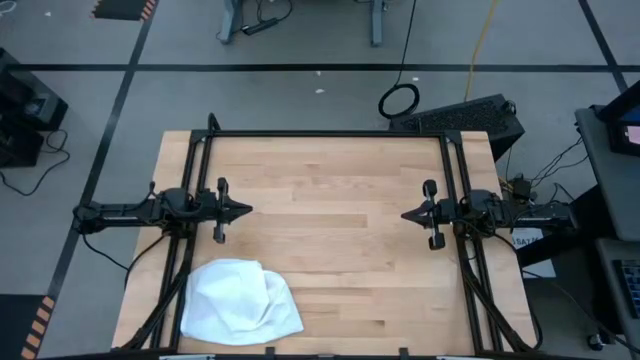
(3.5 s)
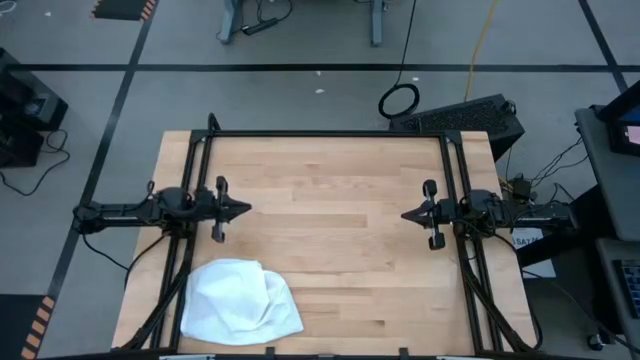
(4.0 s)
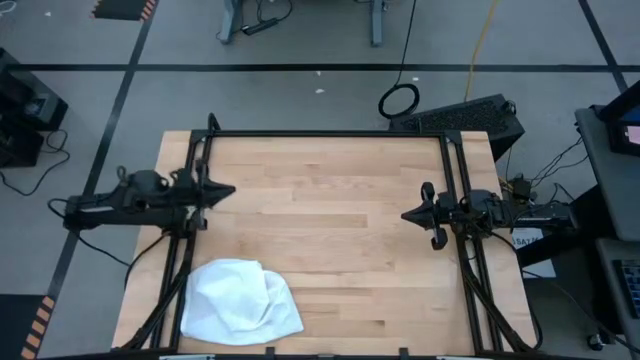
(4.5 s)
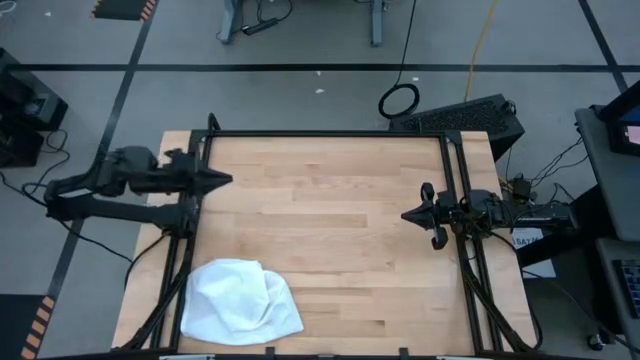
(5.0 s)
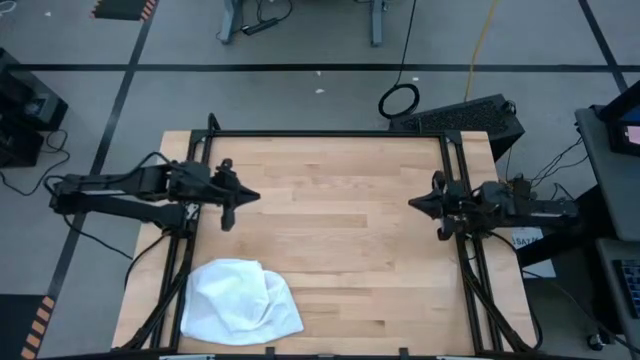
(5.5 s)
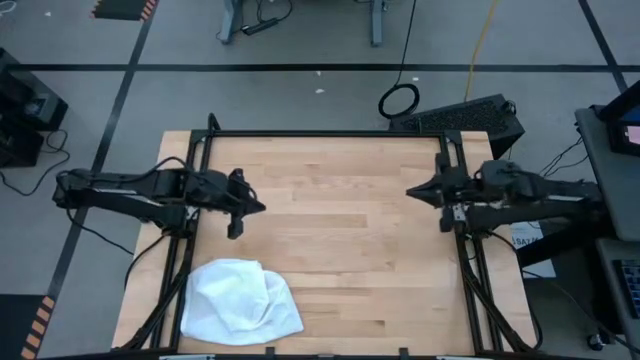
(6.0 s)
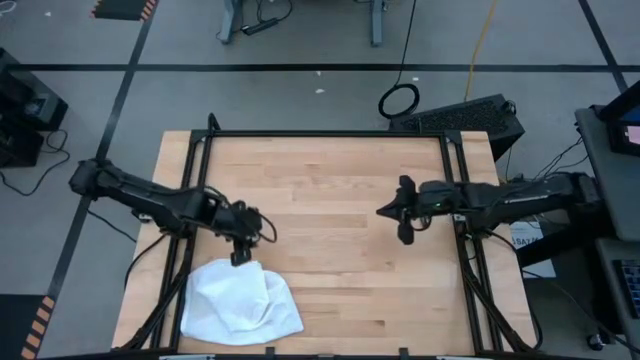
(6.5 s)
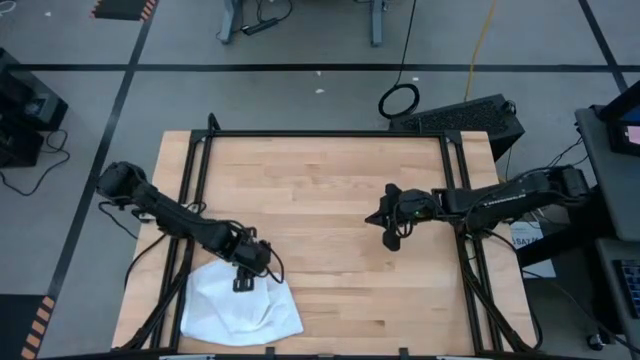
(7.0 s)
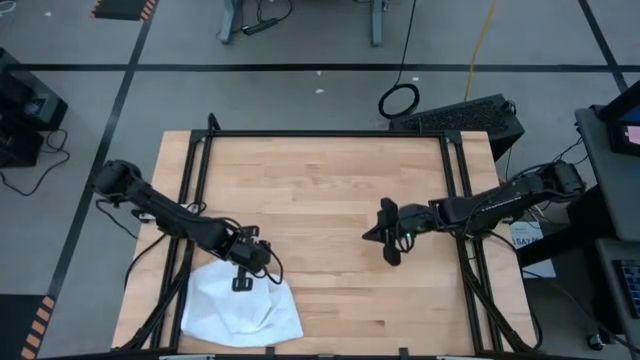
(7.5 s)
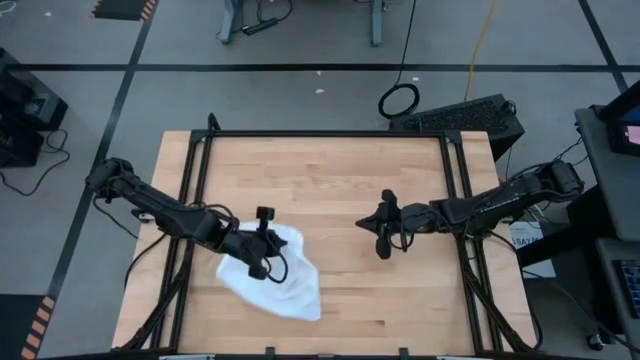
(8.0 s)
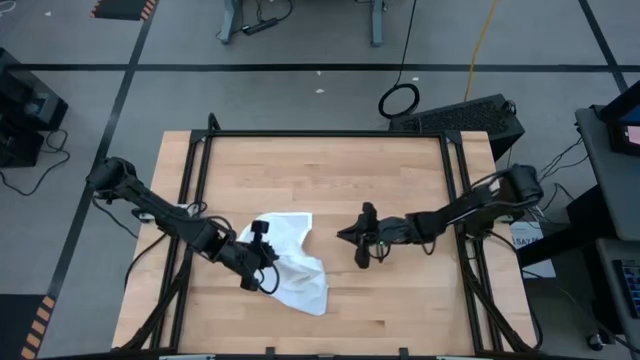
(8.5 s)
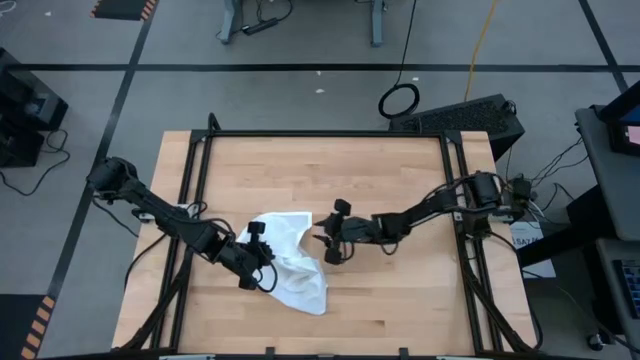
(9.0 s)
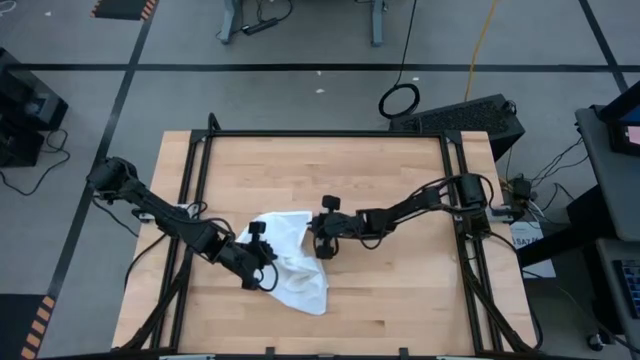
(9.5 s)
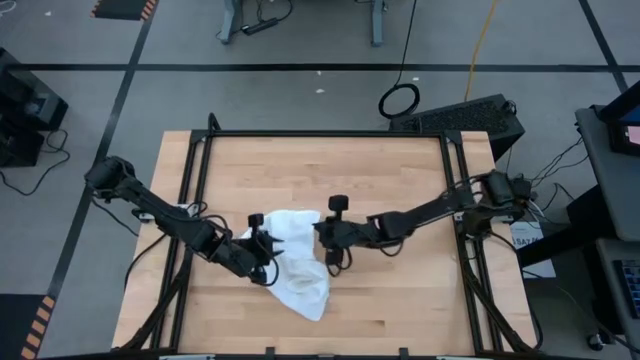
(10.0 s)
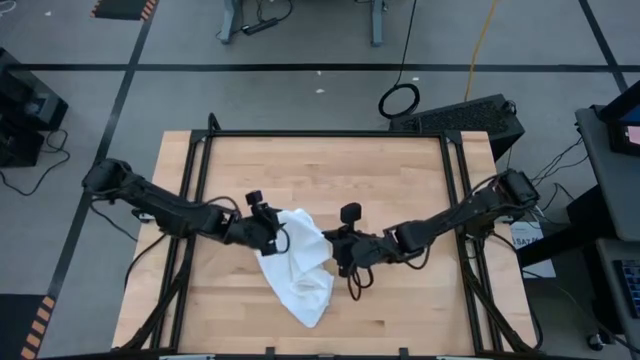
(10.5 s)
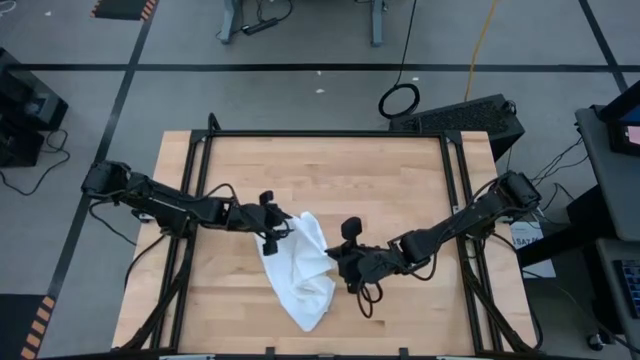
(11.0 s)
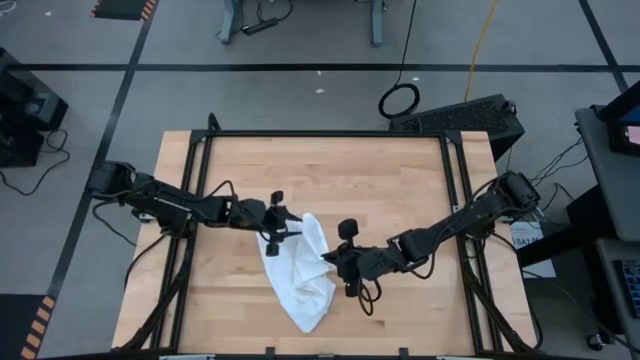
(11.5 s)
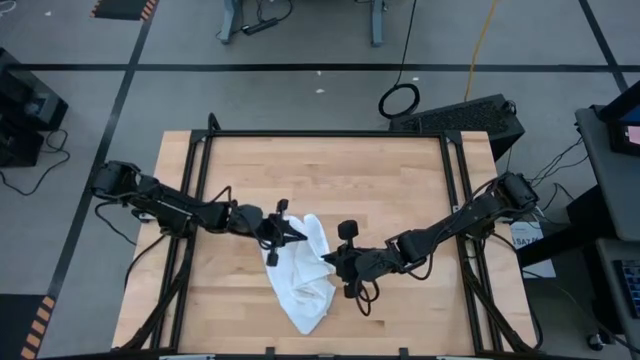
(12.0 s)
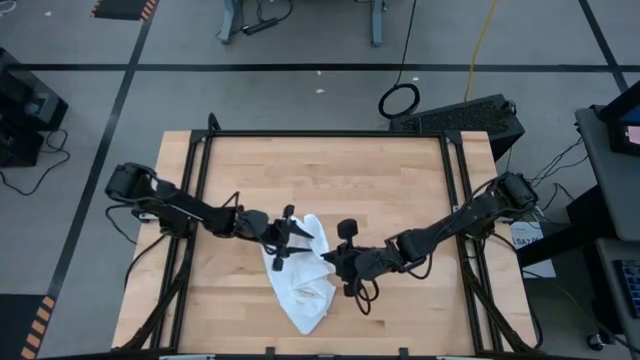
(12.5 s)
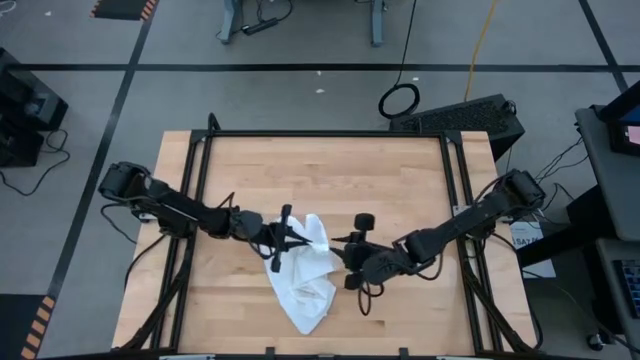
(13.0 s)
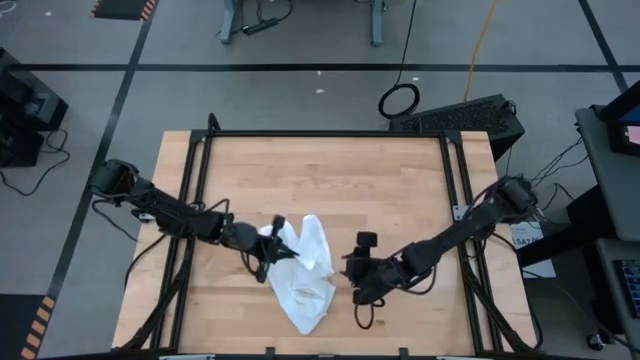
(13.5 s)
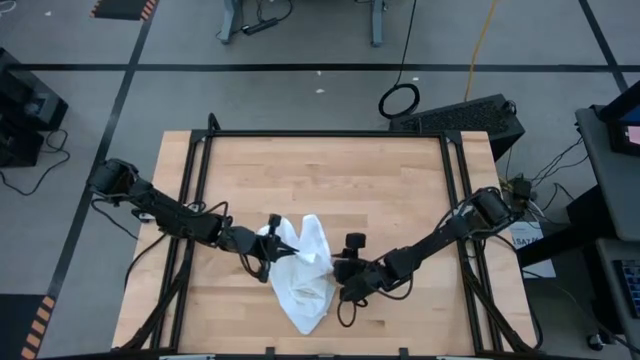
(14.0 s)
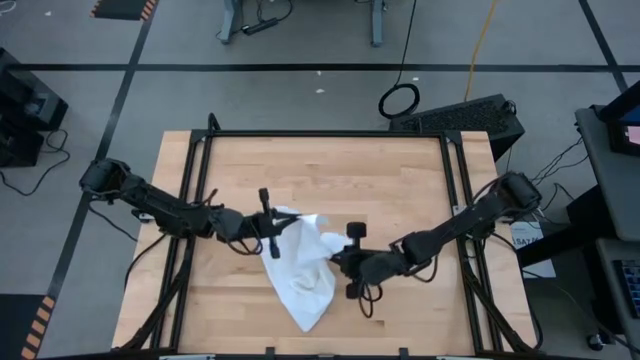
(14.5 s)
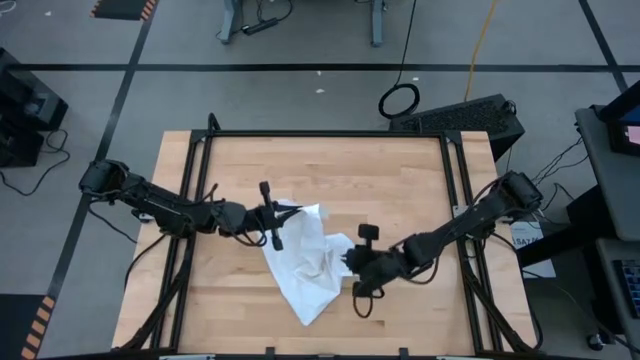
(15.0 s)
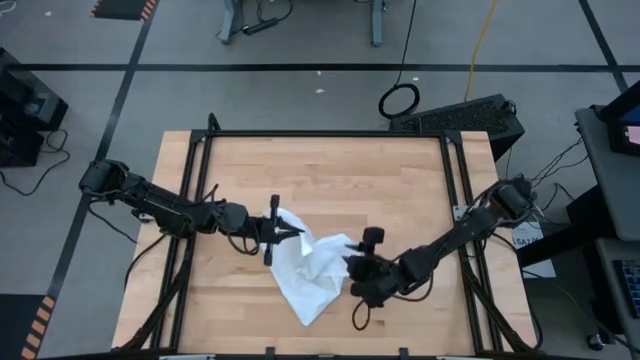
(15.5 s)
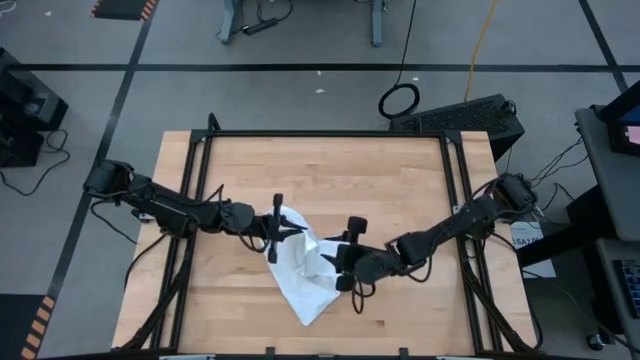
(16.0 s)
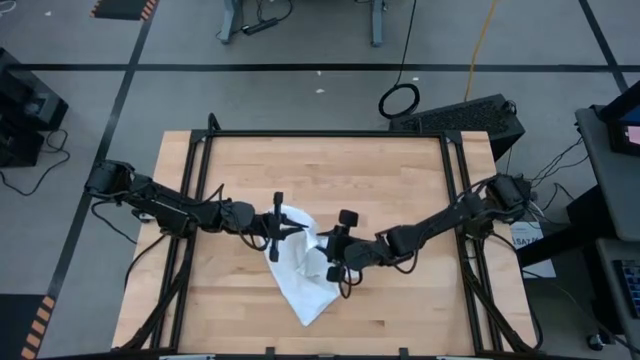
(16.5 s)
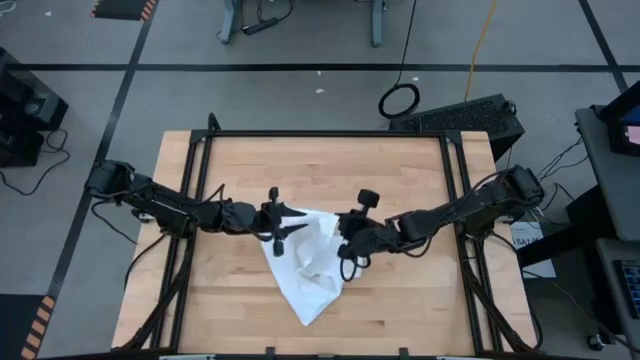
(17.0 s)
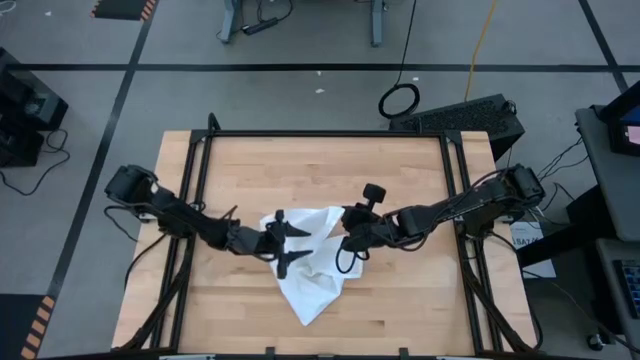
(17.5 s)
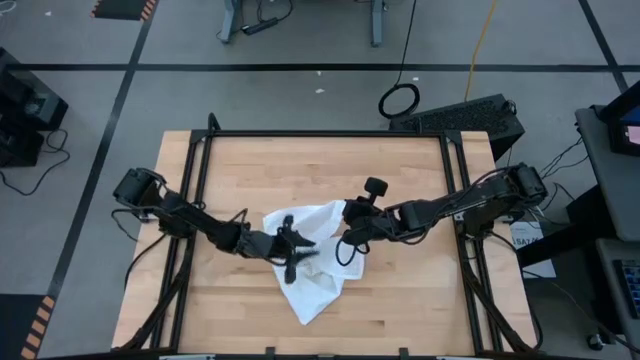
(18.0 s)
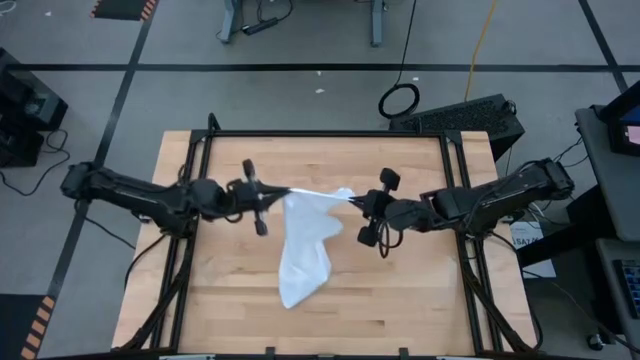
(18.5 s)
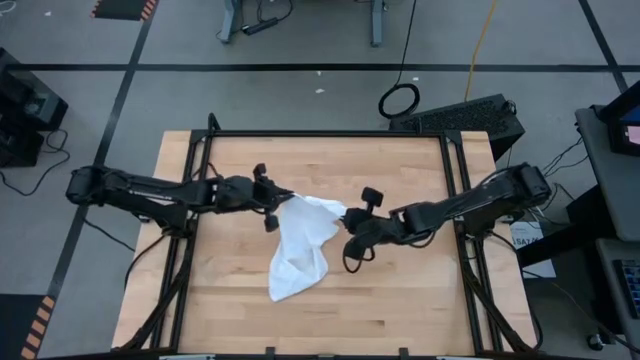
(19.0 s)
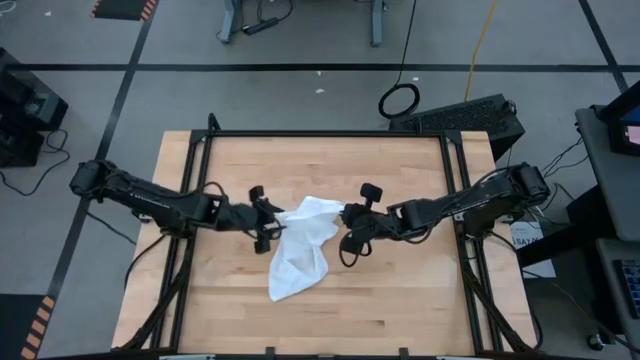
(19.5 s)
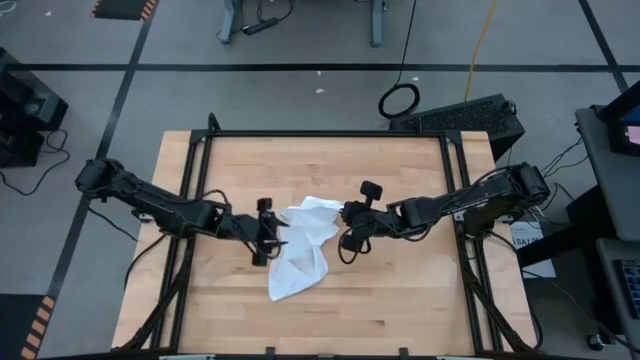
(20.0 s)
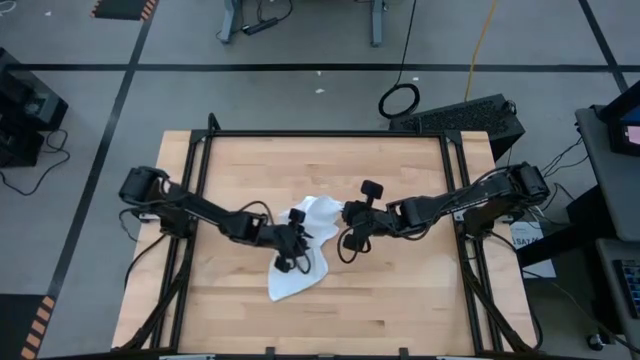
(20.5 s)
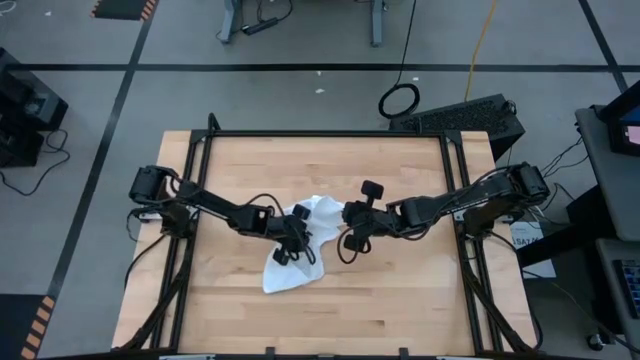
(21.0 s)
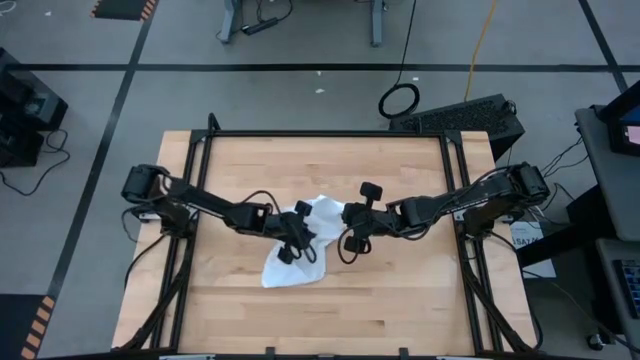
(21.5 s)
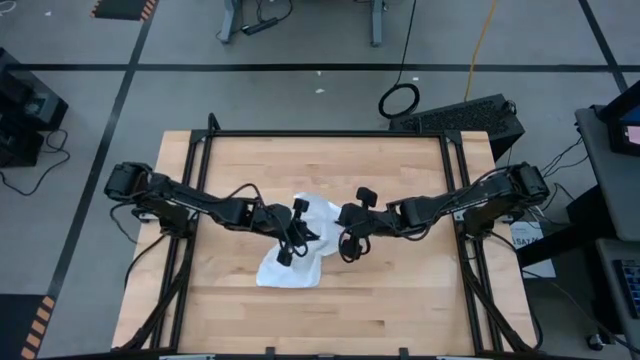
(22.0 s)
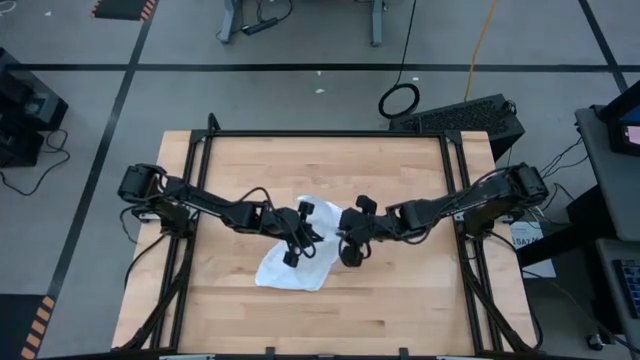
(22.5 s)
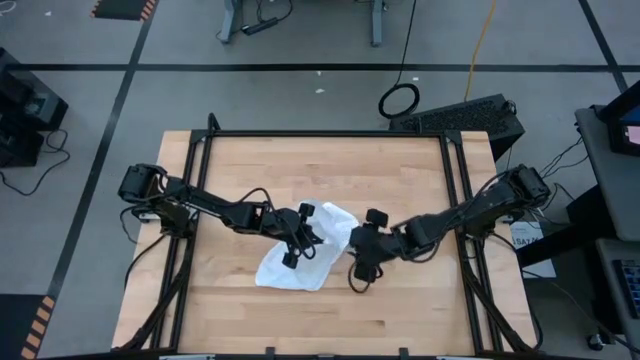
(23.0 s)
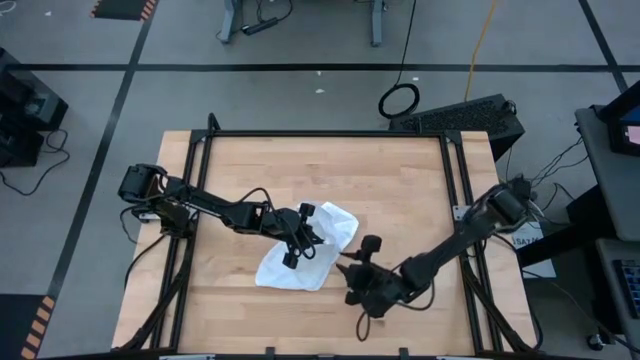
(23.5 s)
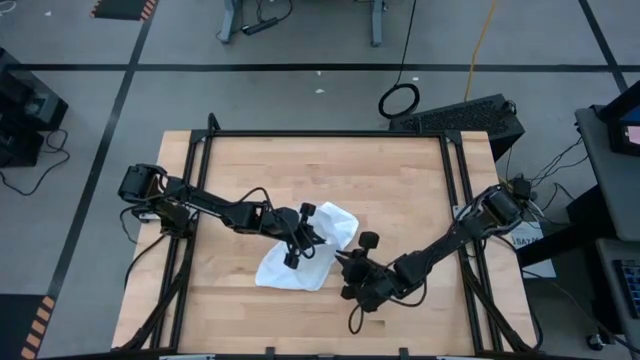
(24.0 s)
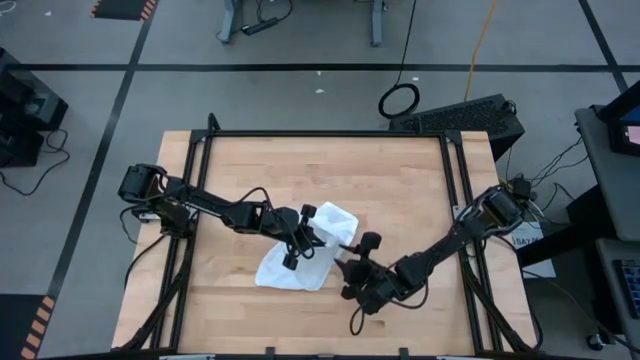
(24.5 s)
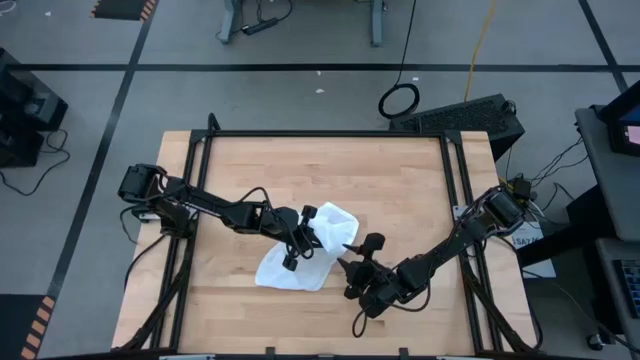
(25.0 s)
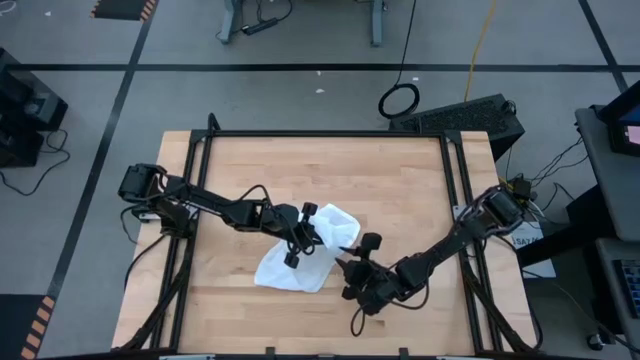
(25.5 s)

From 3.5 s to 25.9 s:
Task: Roll towel
Roll the white towel
